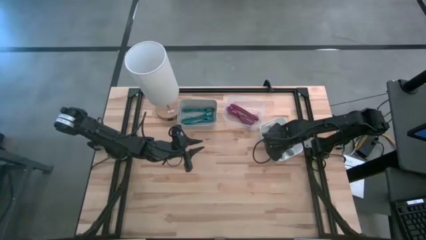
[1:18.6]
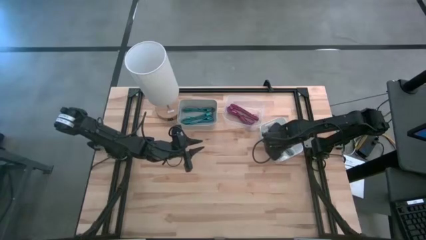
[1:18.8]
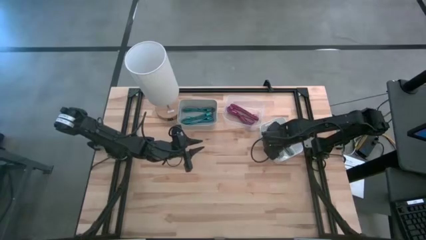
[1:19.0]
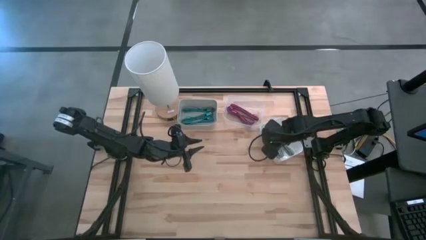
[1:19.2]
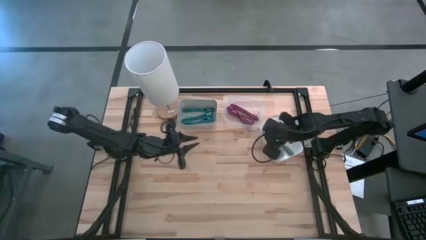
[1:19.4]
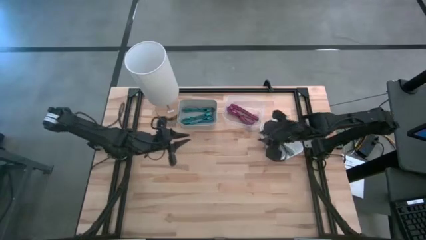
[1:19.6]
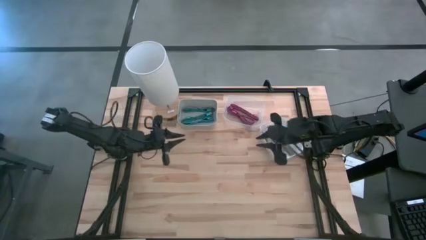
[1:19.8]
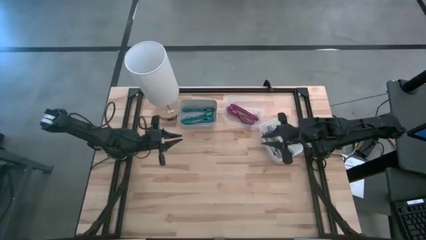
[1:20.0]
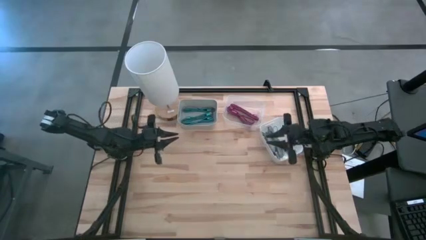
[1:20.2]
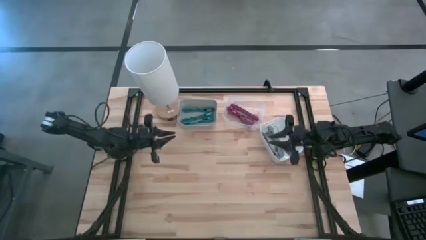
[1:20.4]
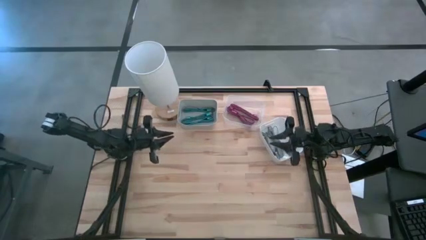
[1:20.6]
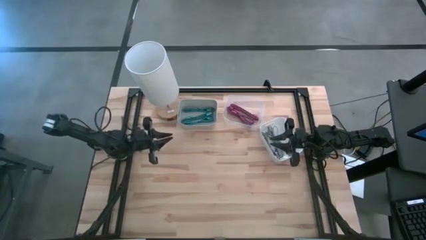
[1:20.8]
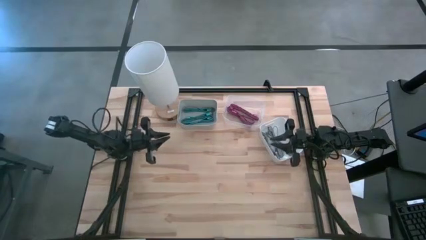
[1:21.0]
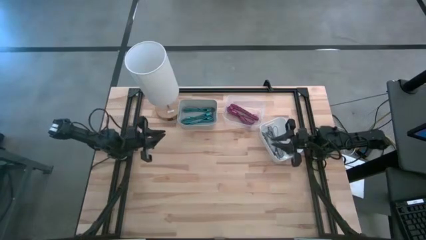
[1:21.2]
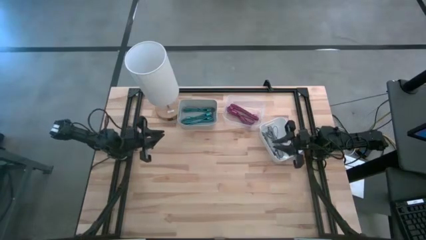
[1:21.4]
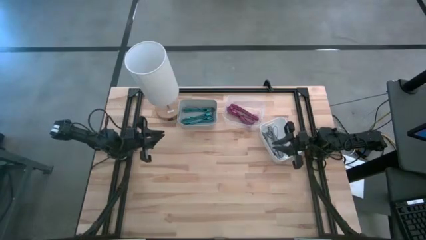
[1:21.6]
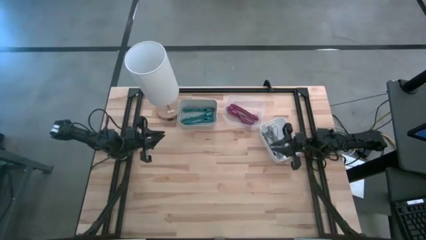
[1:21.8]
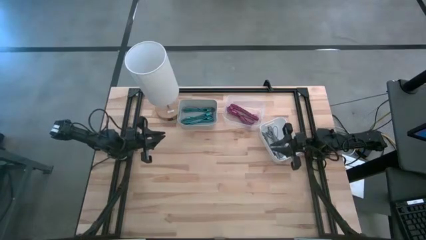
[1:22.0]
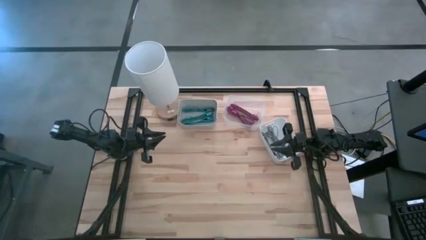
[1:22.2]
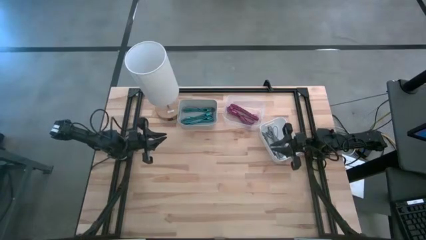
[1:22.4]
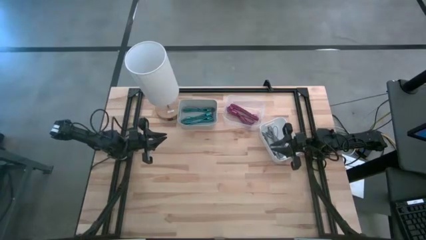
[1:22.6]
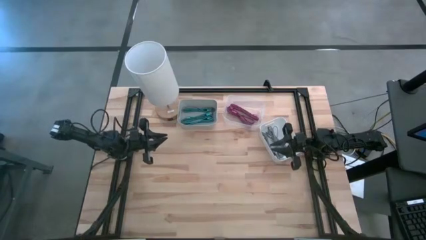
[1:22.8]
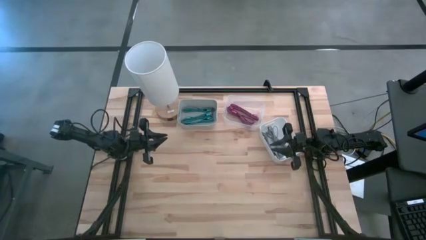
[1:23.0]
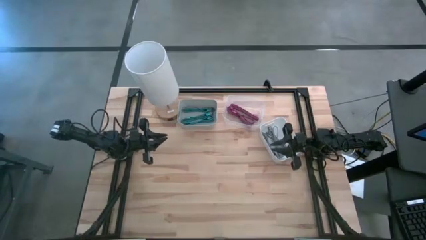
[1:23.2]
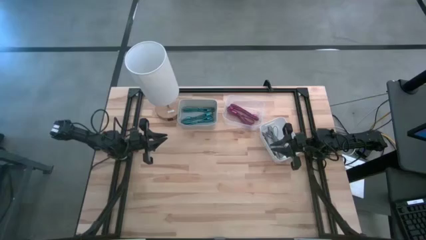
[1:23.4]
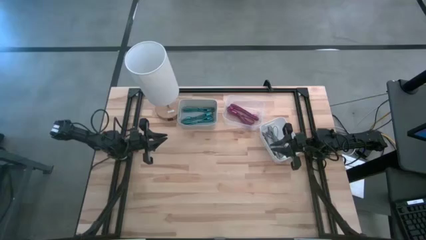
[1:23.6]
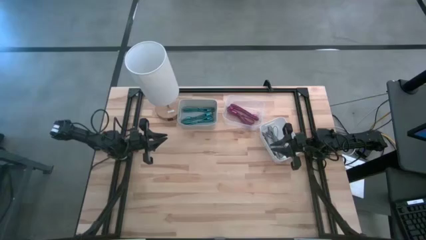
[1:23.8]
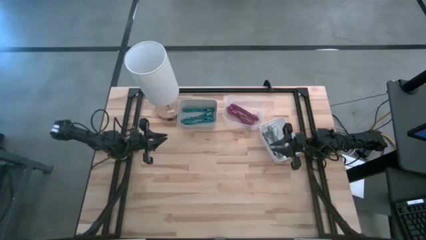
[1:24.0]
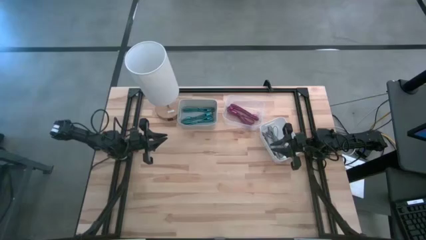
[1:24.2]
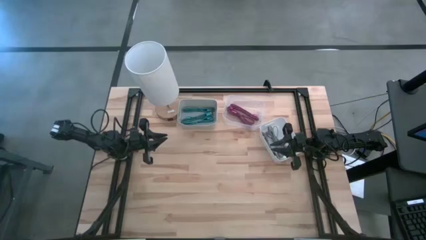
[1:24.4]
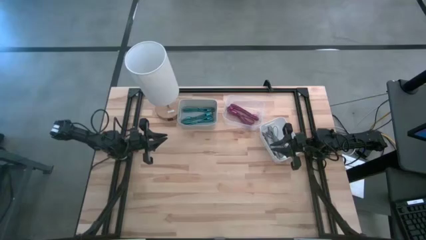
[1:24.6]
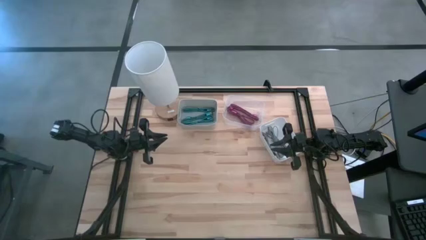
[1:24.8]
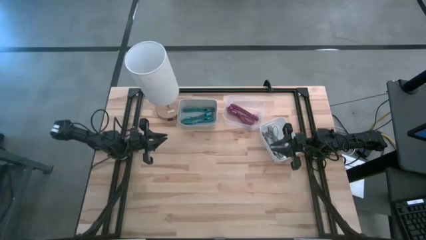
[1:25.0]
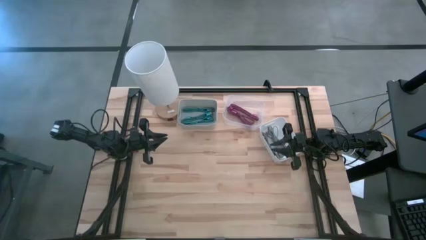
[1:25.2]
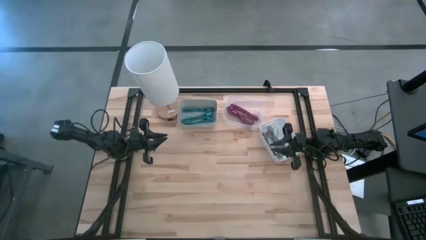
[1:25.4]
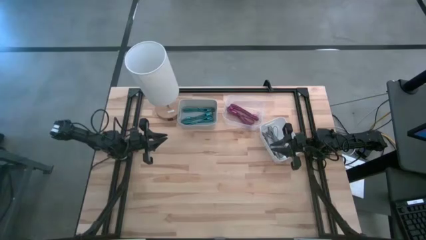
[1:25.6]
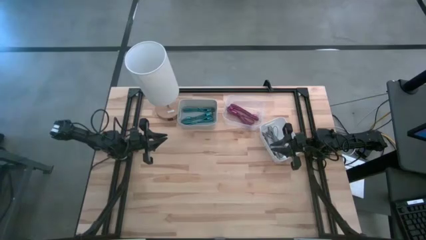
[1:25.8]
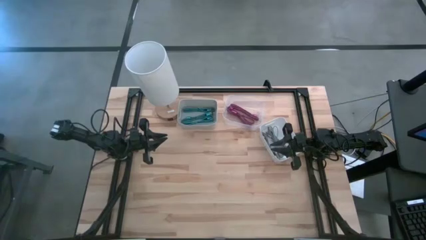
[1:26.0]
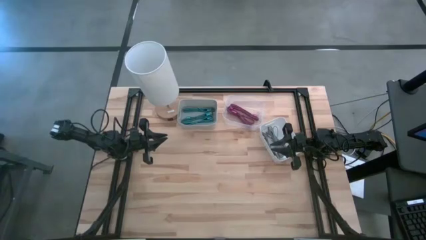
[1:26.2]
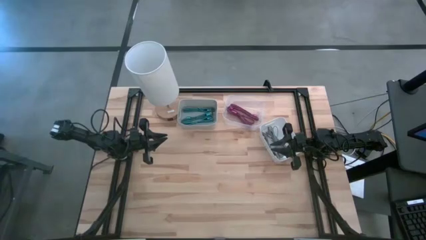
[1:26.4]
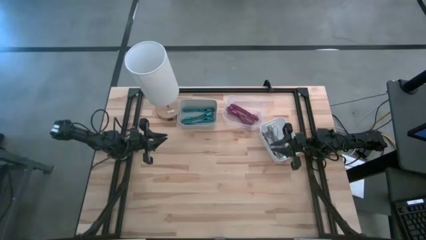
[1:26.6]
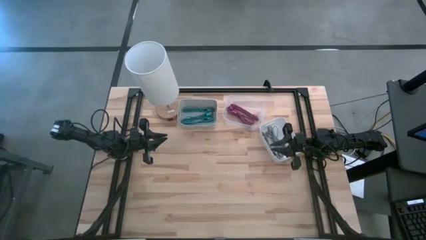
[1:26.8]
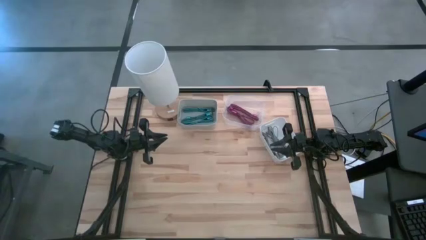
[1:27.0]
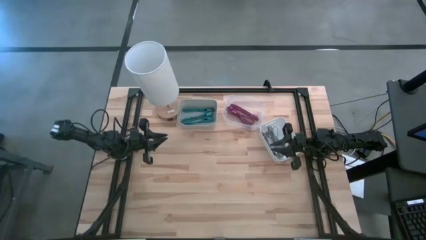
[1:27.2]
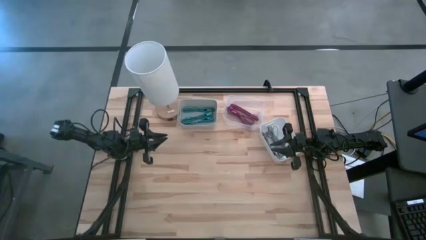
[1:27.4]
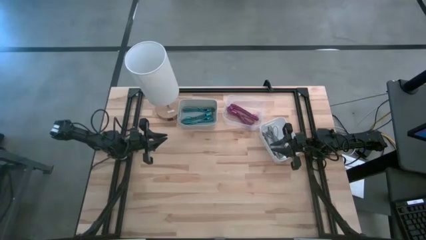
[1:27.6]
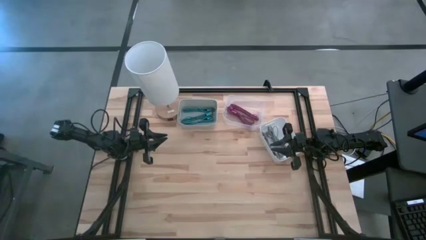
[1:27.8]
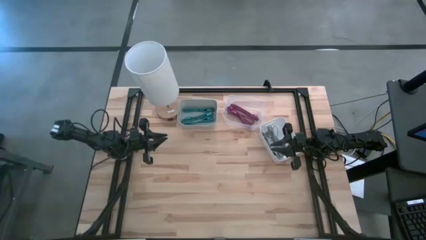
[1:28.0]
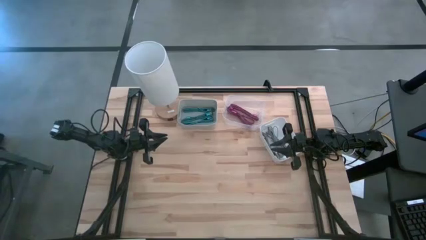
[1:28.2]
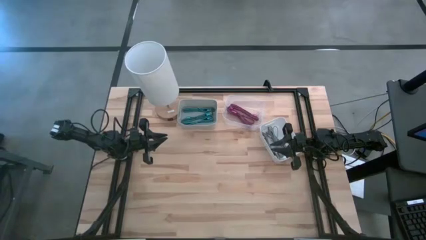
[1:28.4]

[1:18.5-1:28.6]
Task: Pick & Place USB Port
Return to Home Position

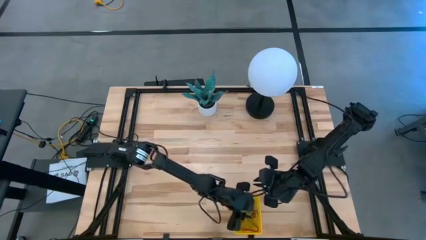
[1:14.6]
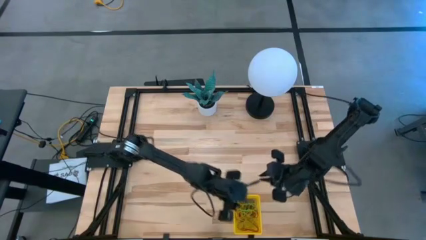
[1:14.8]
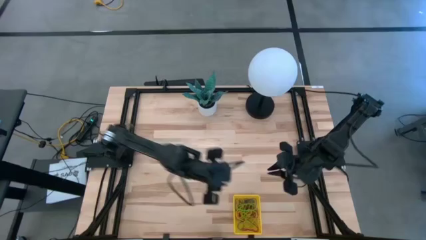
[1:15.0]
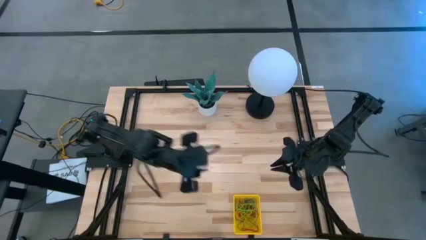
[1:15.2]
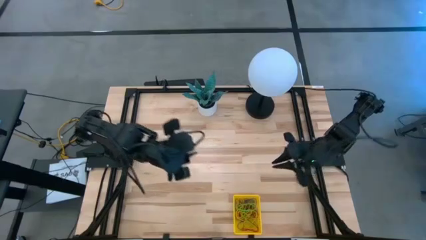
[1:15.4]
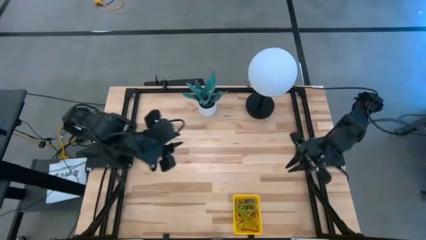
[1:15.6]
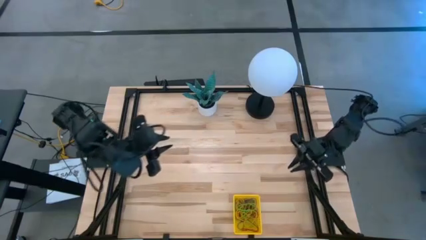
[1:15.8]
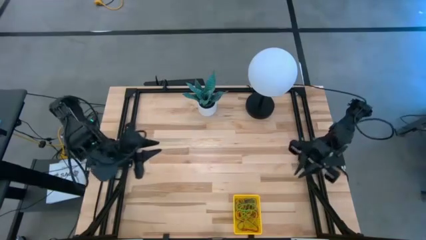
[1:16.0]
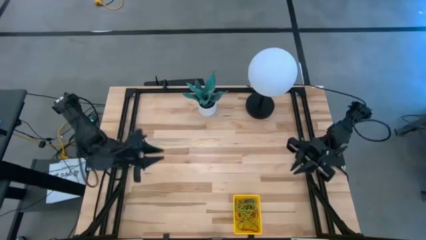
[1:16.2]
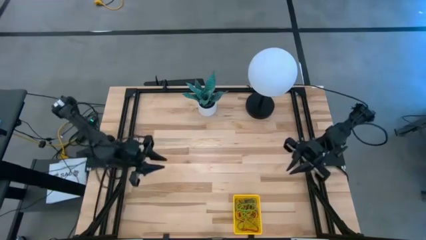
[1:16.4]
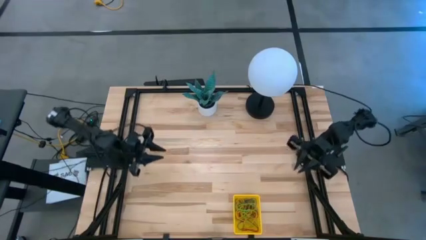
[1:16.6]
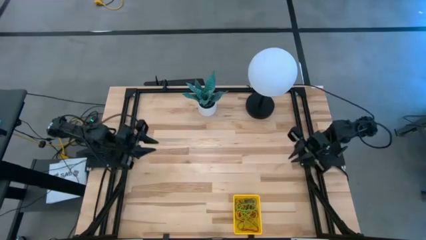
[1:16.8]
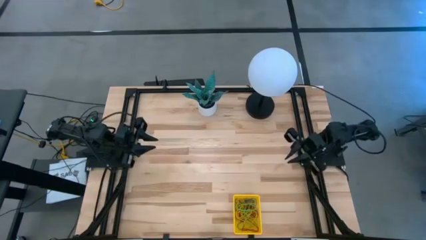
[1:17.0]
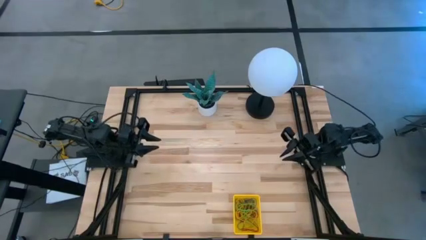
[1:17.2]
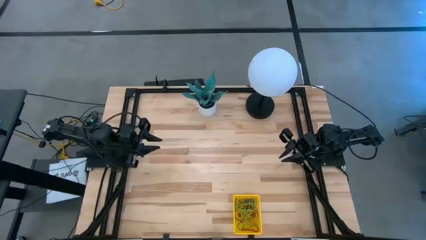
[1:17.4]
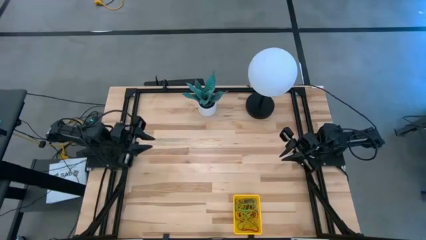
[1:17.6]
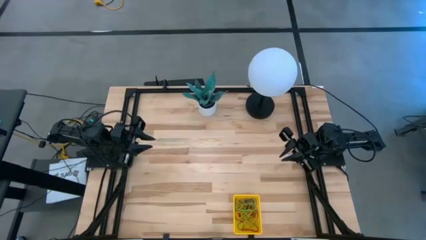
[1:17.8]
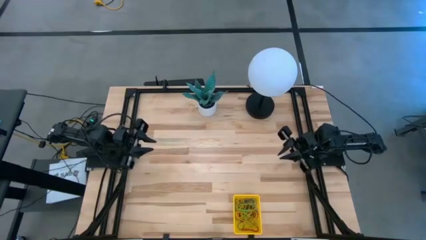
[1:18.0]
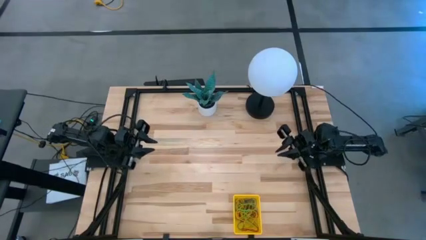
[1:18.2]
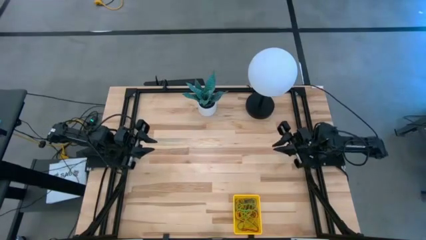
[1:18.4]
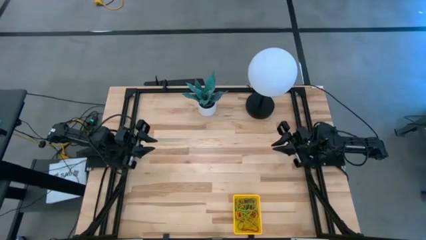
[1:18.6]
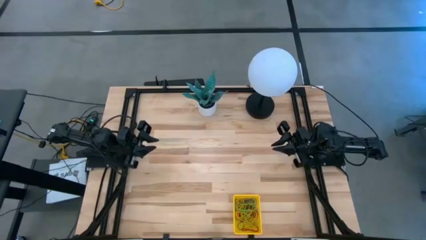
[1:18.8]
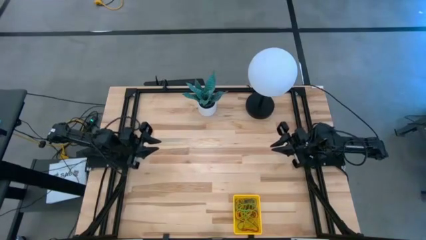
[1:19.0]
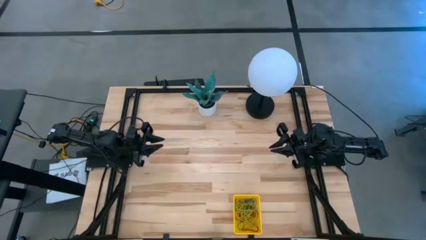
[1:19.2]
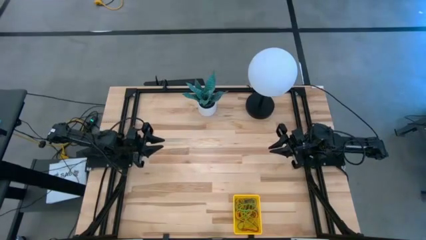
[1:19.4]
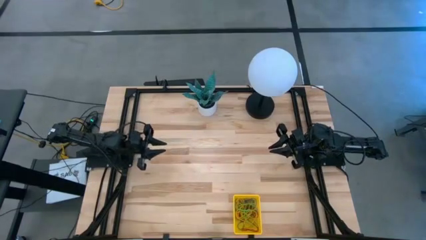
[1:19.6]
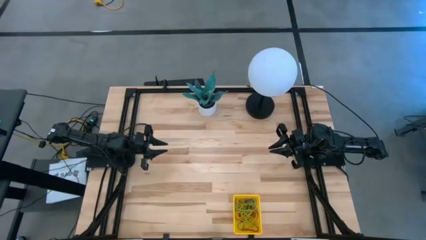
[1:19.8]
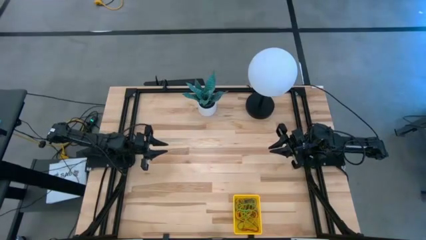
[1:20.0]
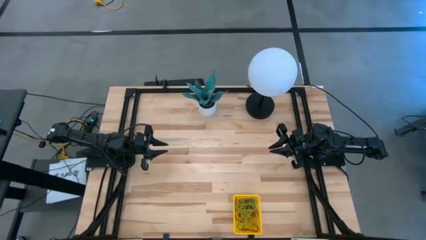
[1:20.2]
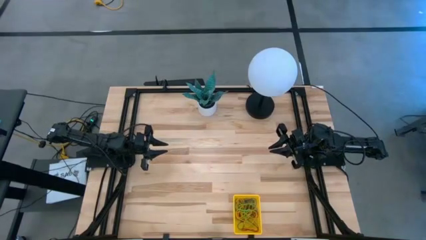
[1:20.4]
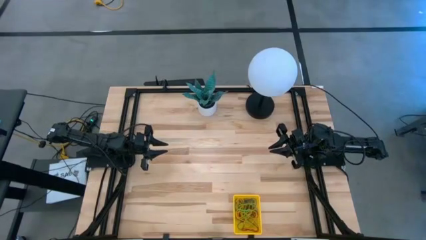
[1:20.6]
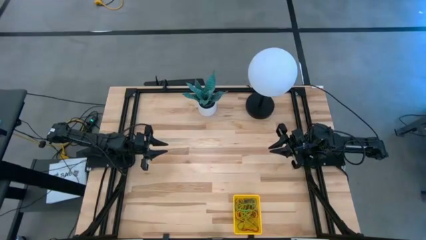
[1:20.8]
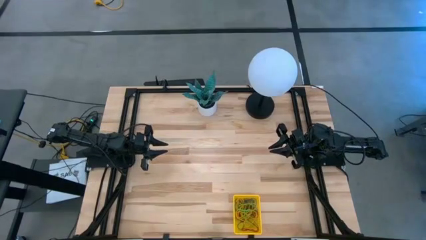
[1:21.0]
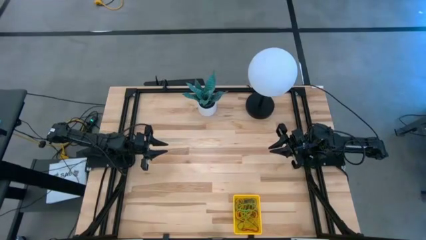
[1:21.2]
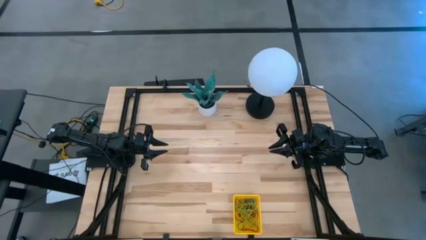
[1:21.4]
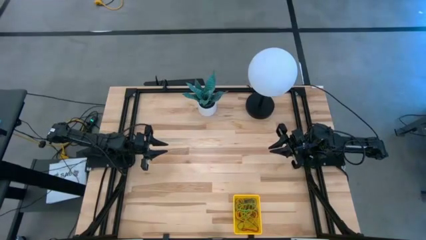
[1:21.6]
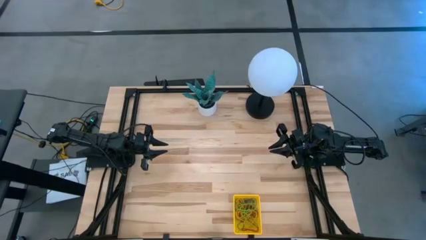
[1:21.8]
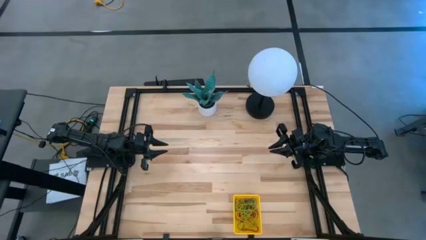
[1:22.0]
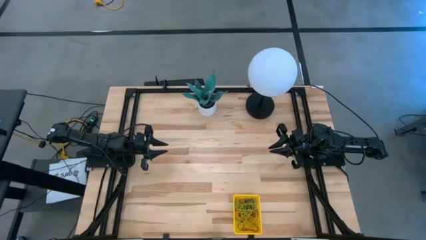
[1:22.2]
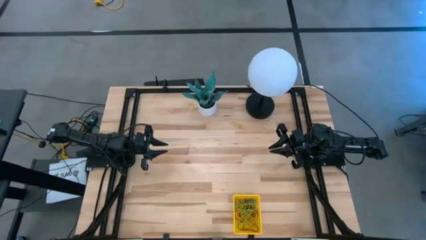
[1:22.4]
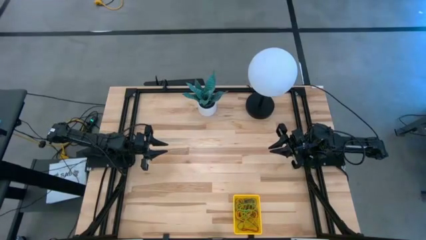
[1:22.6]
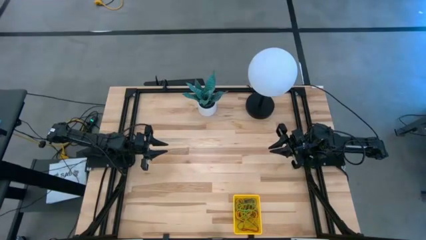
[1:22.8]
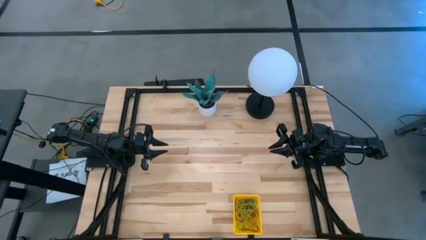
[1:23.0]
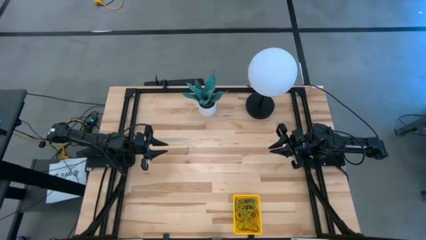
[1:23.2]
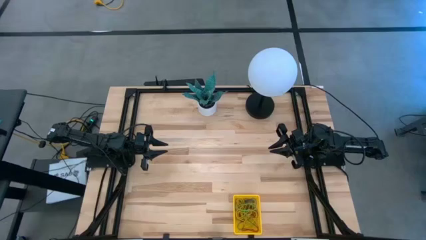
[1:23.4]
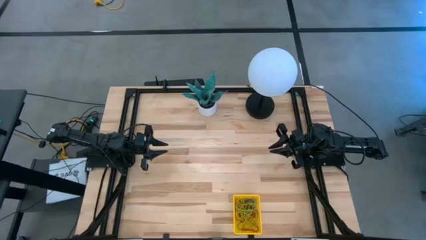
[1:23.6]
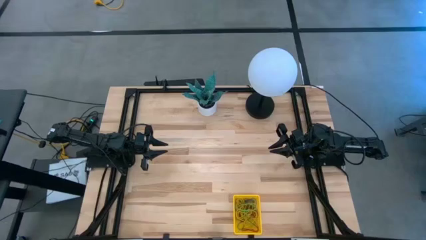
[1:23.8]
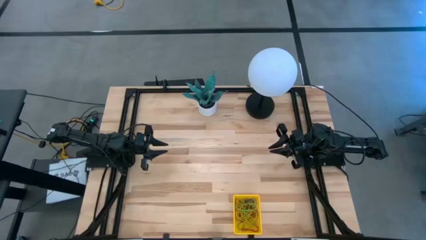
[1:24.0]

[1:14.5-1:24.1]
Task: Pick and place rubber bands into bin
Return to Home Position
